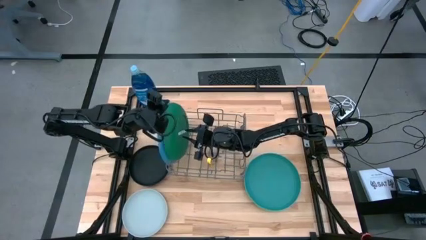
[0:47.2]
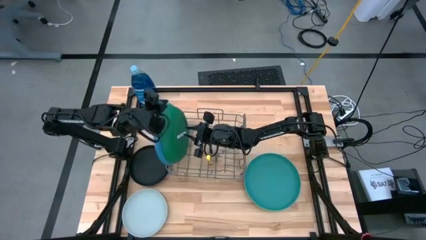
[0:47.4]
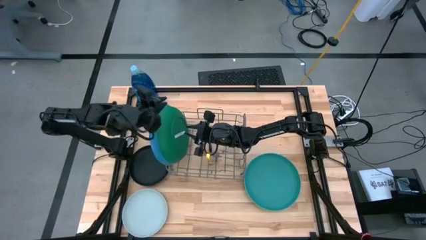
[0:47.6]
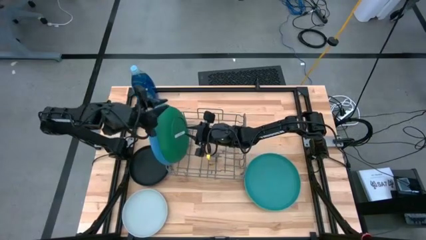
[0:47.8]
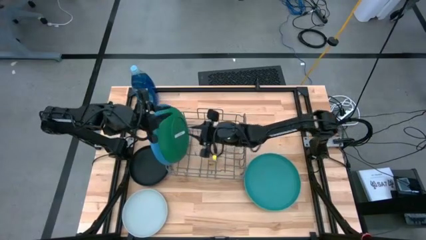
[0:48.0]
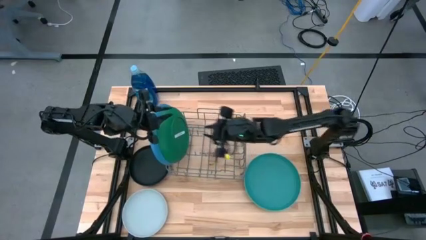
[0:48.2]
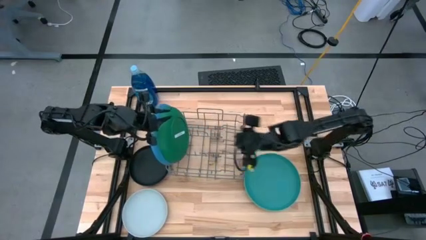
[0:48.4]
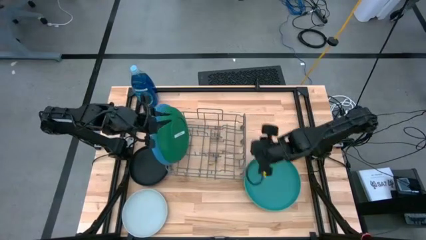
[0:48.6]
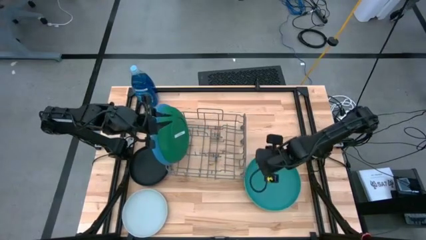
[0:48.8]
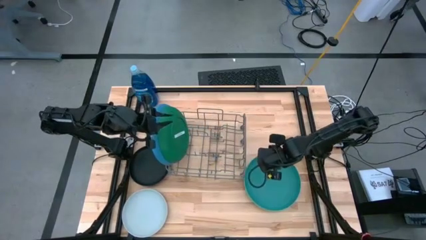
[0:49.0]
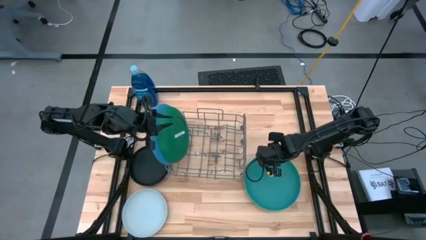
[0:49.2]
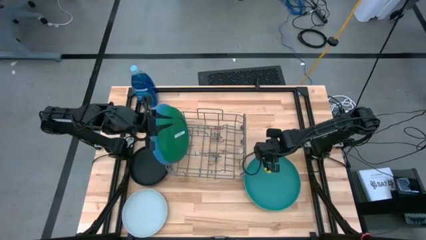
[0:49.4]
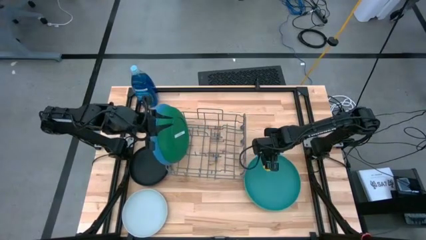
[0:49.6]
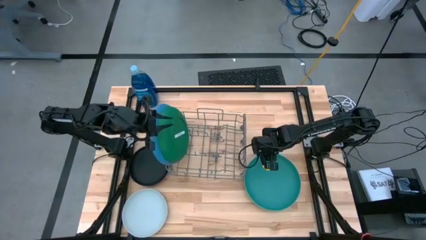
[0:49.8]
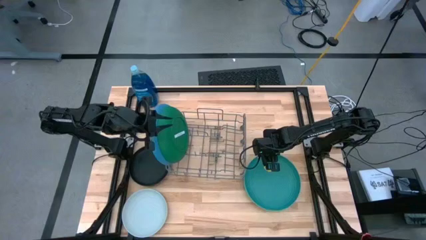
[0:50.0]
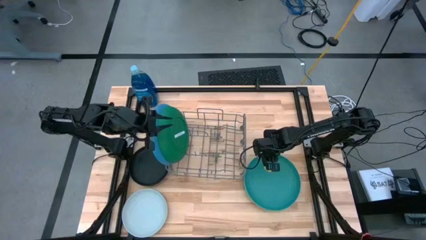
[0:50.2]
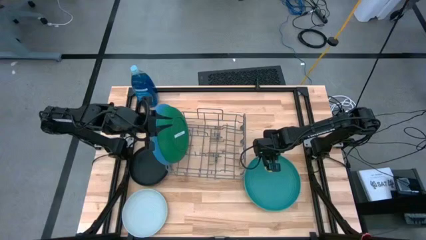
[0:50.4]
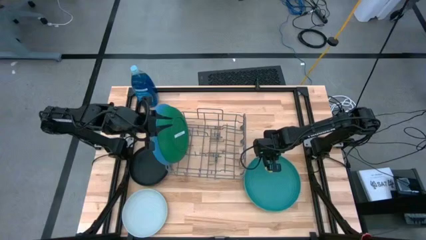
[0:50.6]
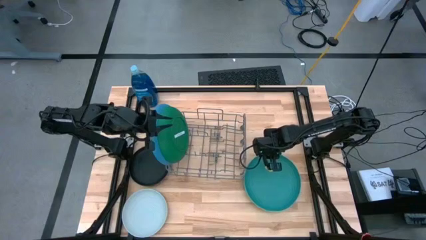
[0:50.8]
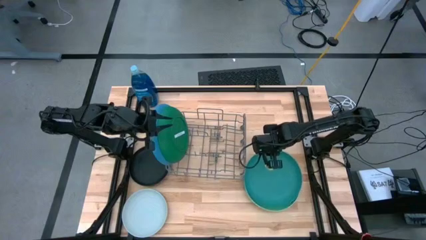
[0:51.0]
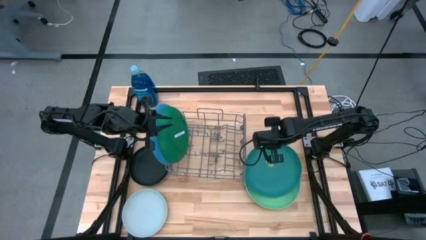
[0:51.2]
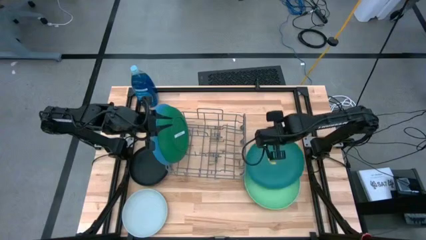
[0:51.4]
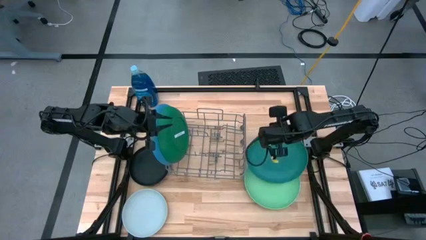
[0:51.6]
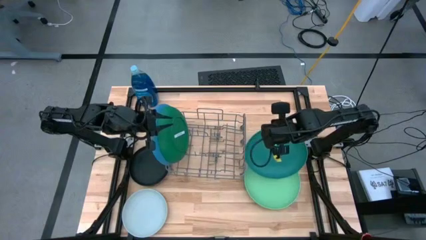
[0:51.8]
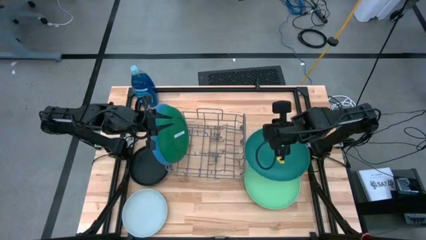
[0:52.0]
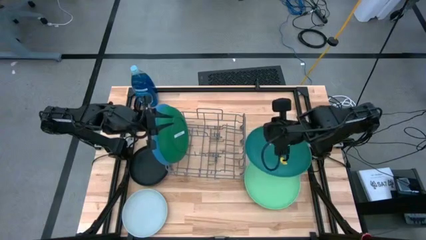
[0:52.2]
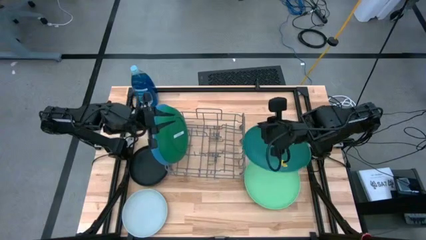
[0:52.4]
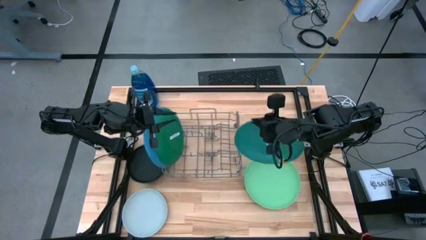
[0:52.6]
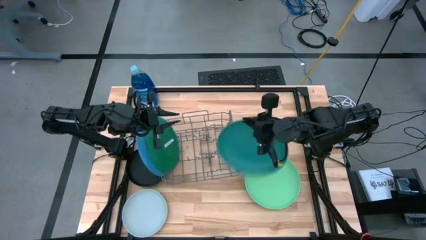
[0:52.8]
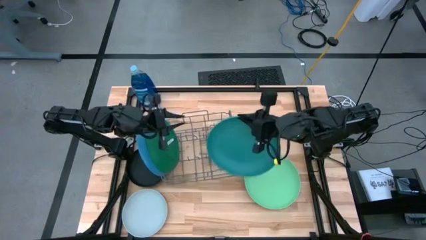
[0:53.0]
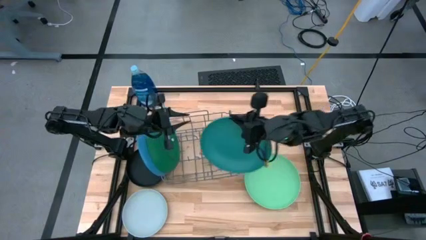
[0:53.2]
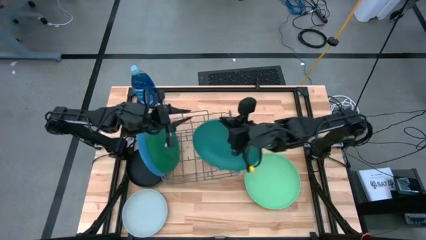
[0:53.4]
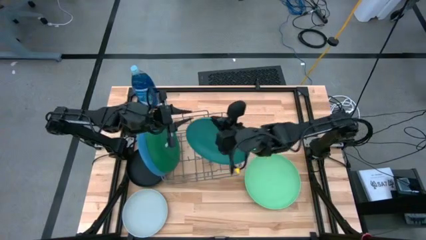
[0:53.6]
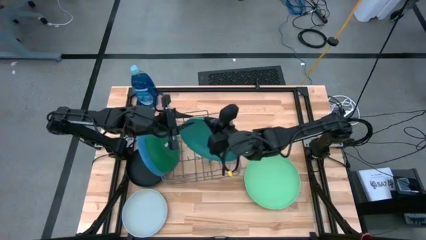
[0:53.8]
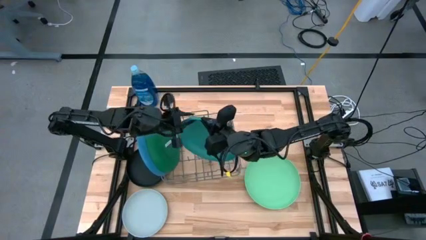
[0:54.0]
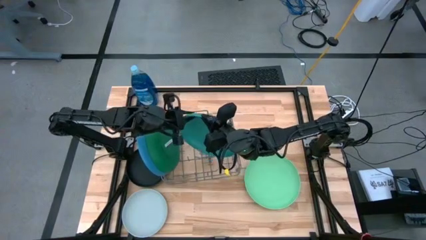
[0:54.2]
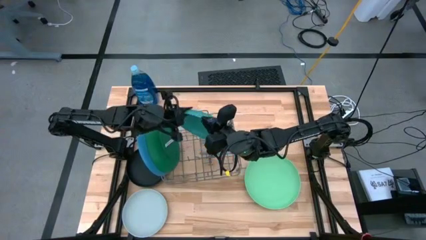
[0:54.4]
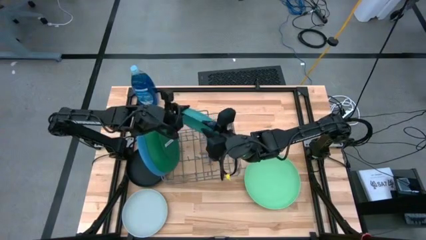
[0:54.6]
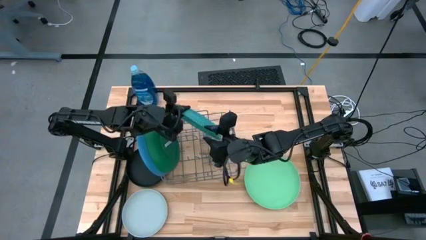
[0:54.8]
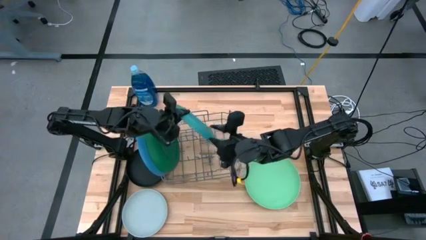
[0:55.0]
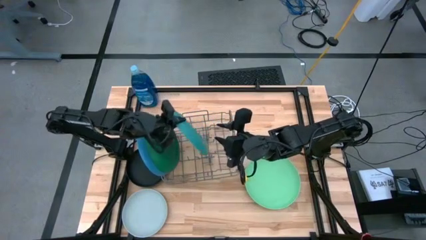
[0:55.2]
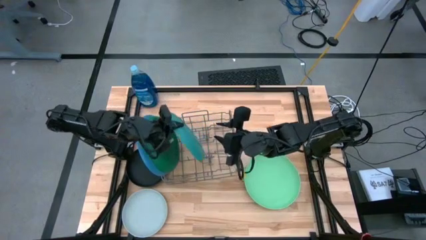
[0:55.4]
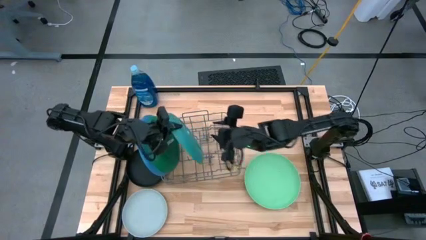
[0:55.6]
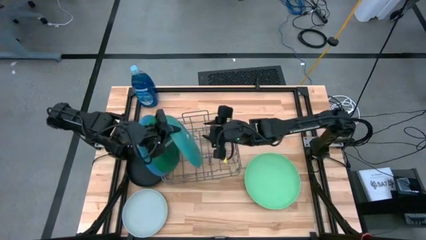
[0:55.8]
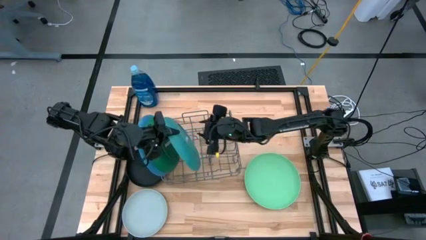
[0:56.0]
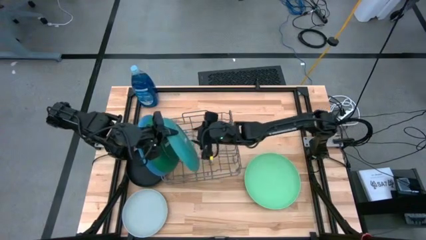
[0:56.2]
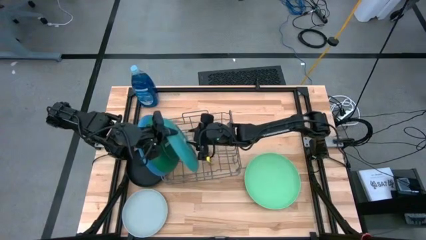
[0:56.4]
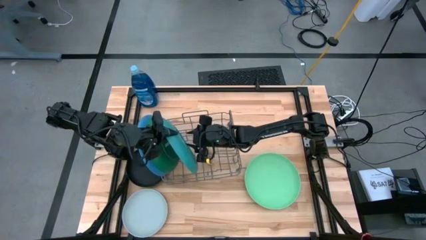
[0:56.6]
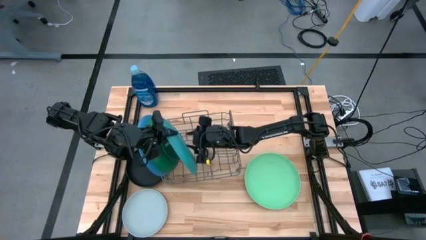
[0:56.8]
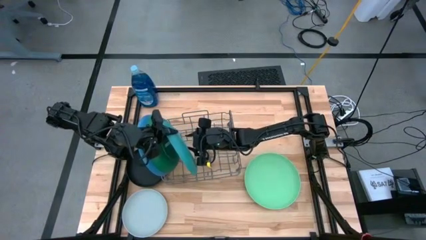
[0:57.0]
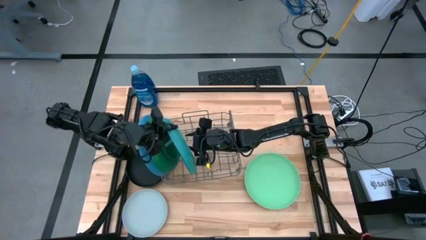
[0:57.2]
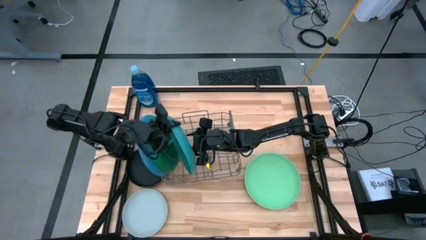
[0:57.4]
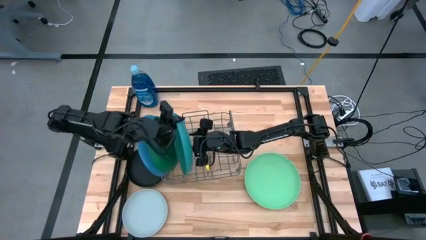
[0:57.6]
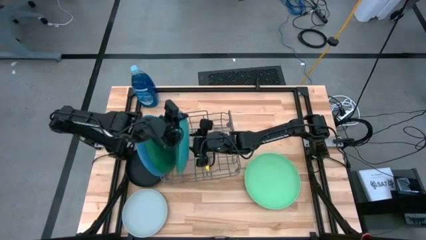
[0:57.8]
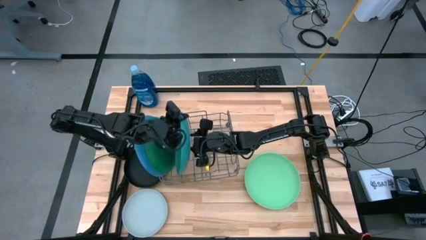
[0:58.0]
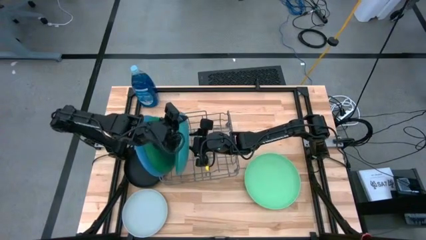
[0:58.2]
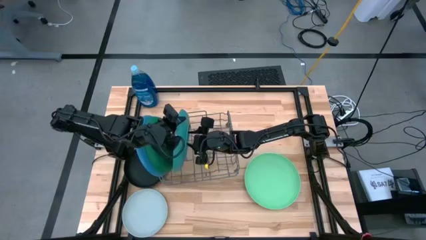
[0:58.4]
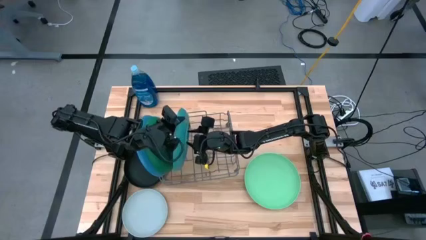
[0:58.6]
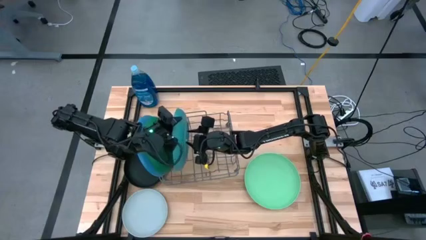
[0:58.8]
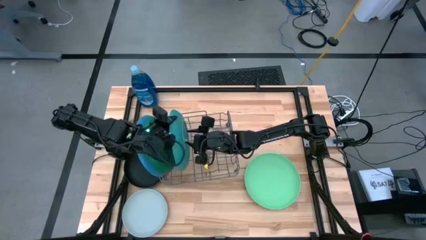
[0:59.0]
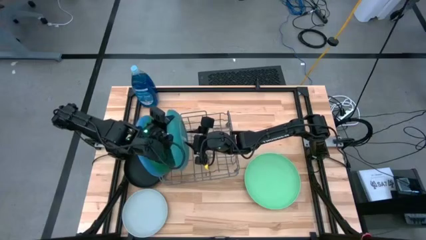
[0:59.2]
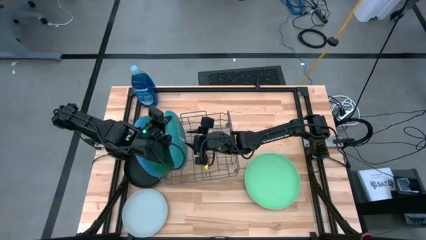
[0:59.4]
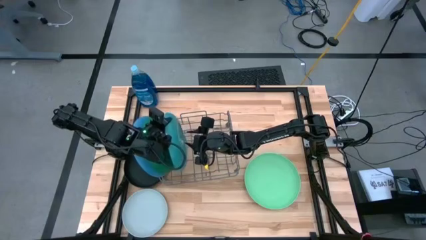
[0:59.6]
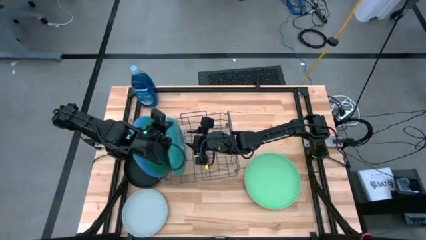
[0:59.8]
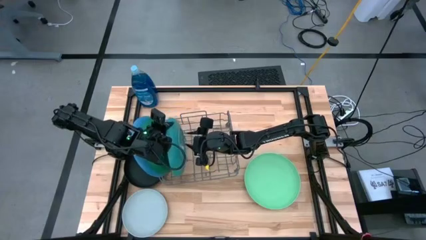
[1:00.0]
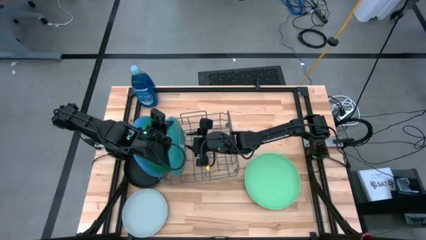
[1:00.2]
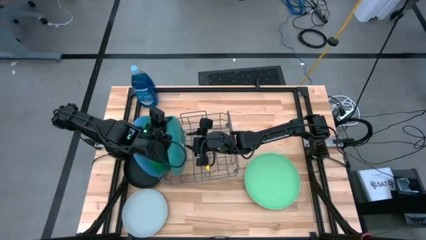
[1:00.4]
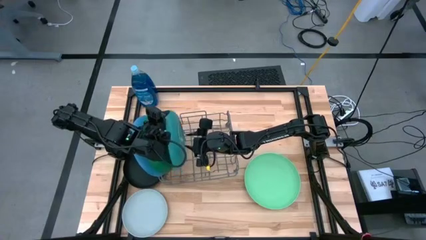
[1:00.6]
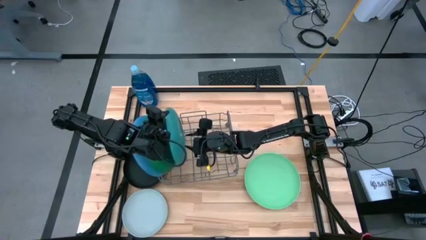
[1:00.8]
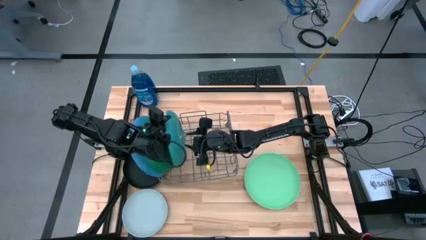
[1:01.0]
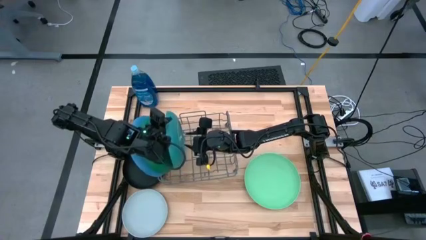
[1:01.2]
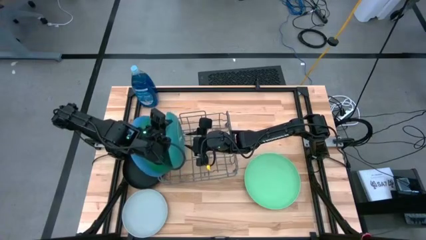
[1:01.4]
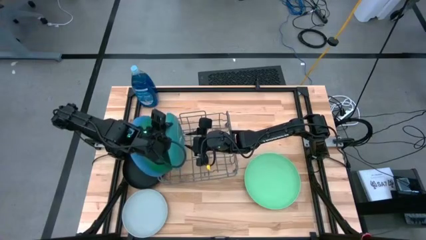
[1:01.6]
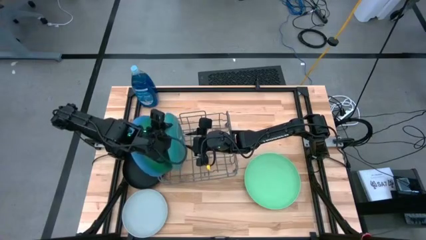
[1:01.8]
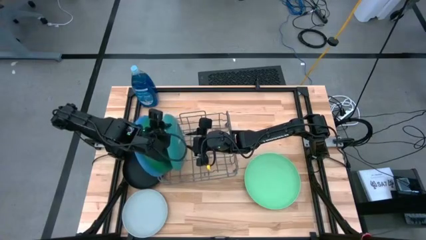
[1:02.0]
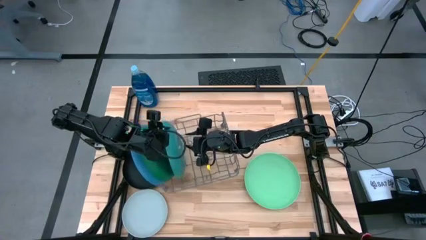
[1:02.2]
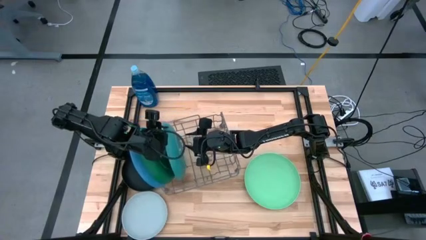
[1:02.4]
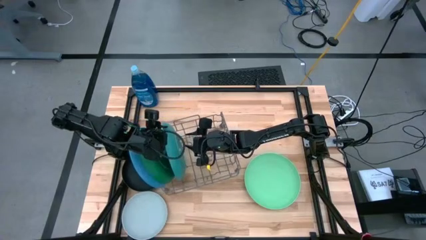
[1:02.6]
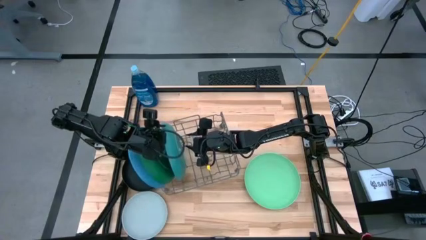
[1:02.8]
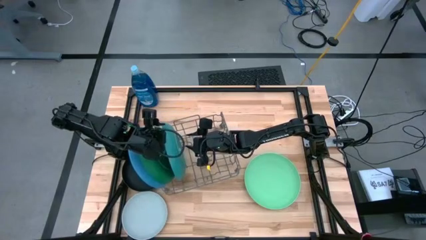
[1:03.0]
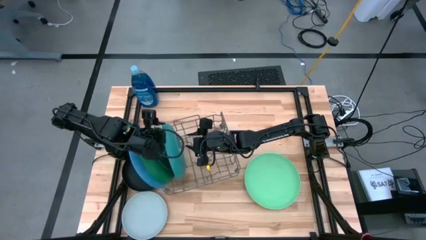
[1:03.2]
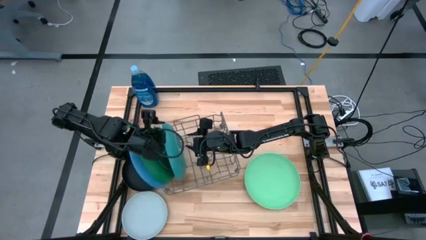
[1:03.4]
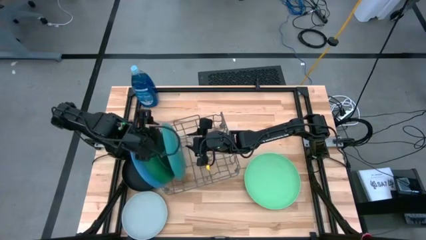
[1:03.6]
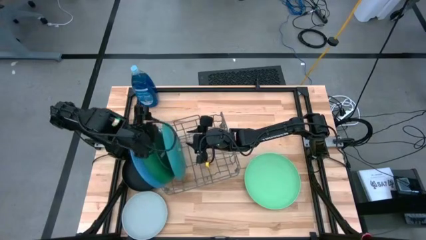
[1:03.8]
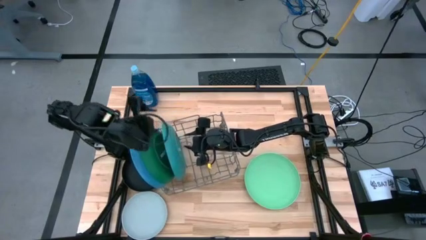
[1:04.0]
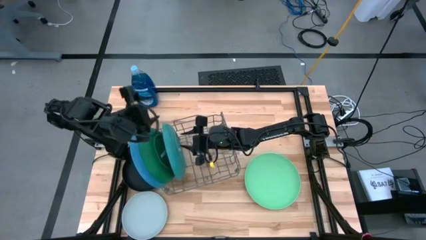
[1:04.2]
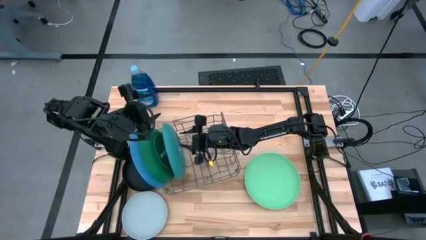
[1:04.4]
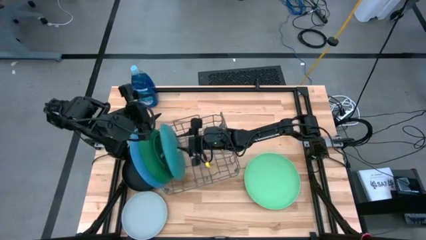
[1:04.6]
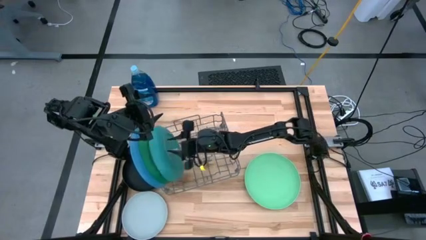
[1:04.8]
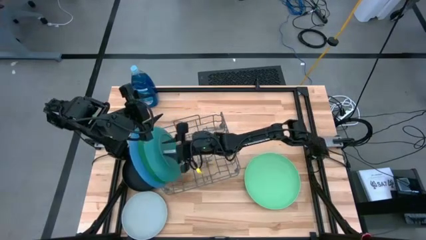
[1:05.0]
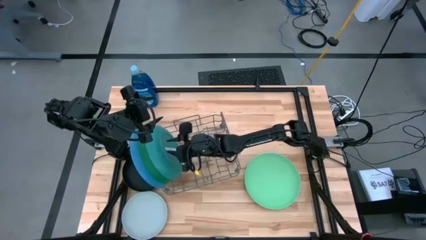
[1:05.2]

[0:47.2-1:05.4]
Task: Sort dishes
Put the dark green plate into the gray dish rack
